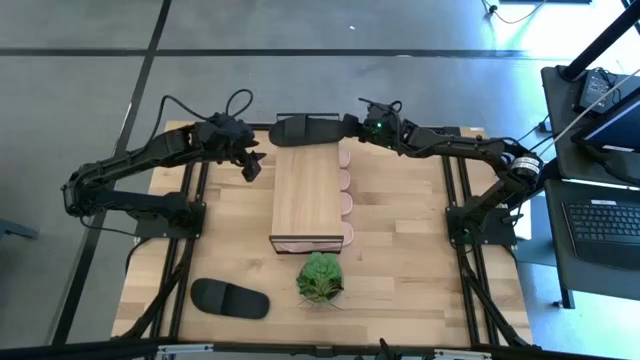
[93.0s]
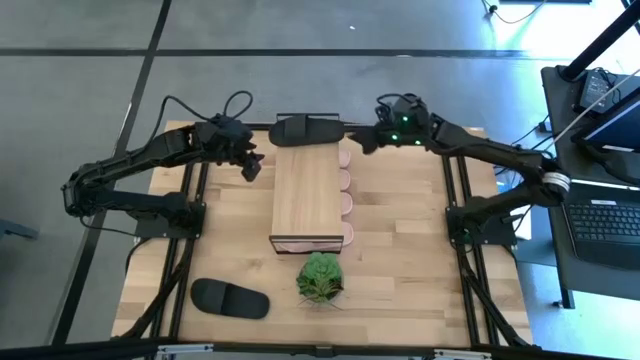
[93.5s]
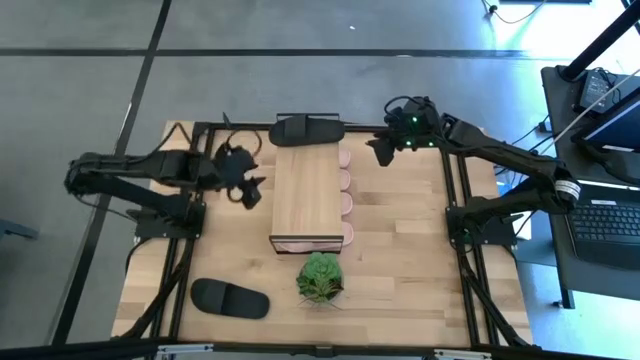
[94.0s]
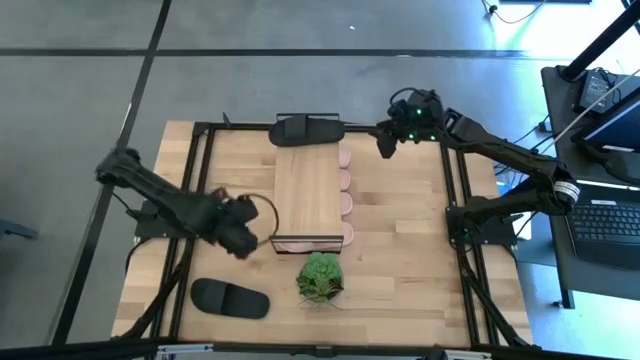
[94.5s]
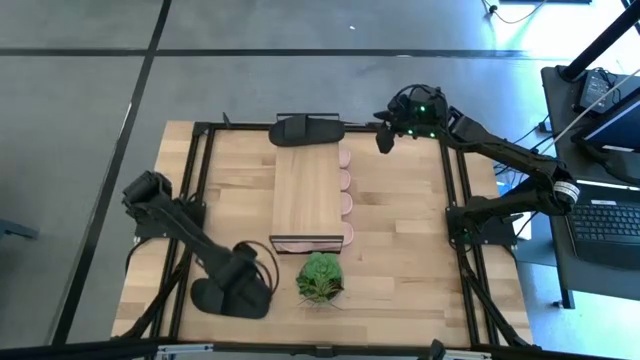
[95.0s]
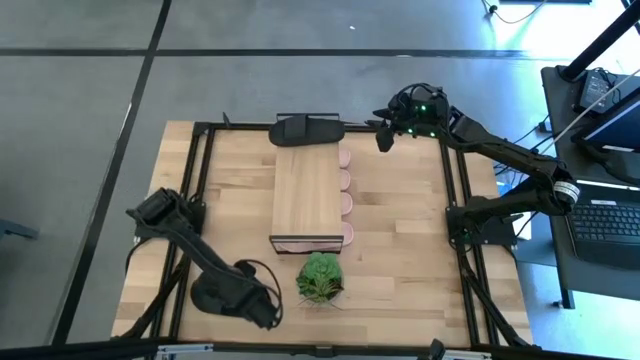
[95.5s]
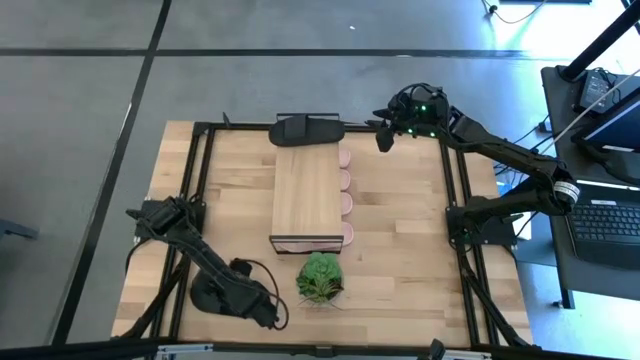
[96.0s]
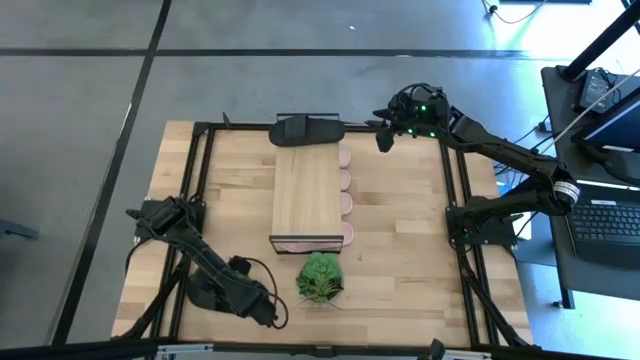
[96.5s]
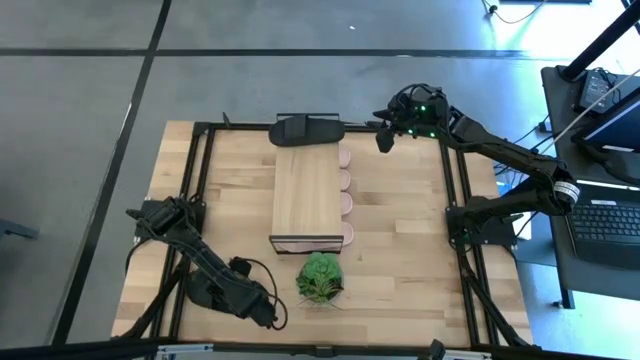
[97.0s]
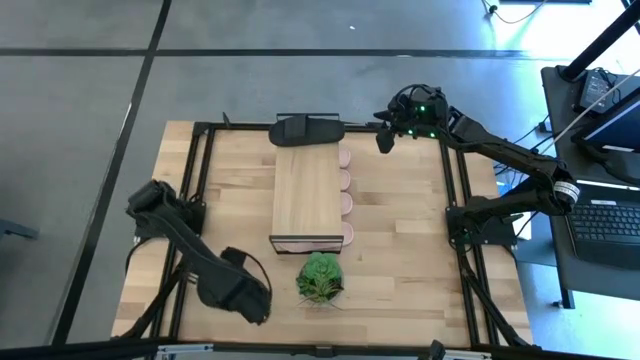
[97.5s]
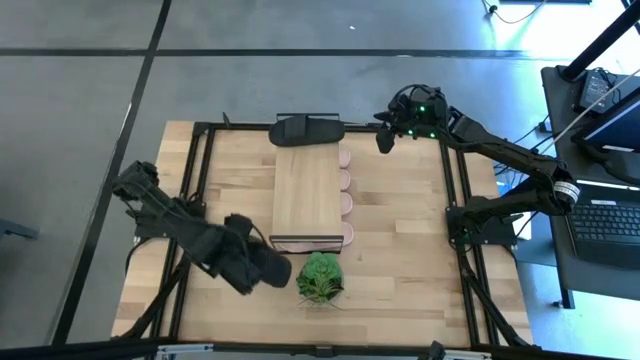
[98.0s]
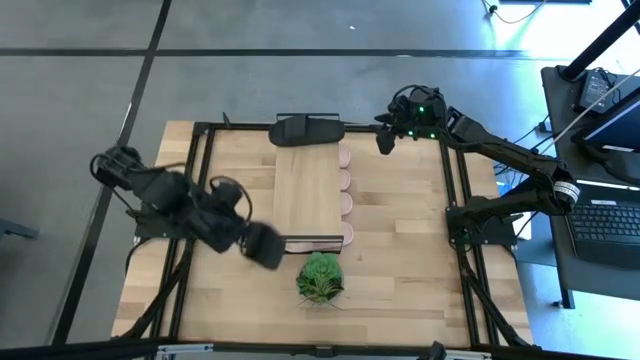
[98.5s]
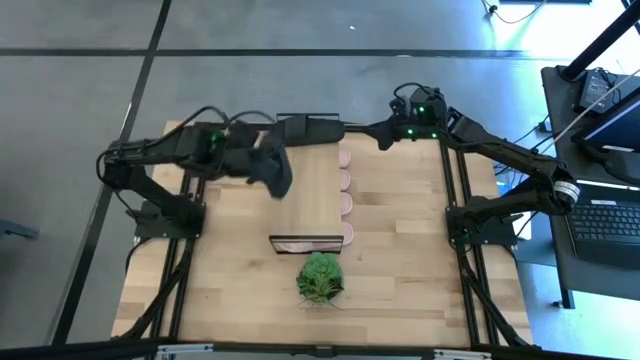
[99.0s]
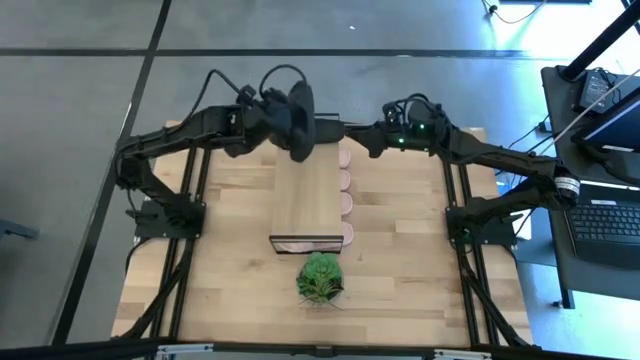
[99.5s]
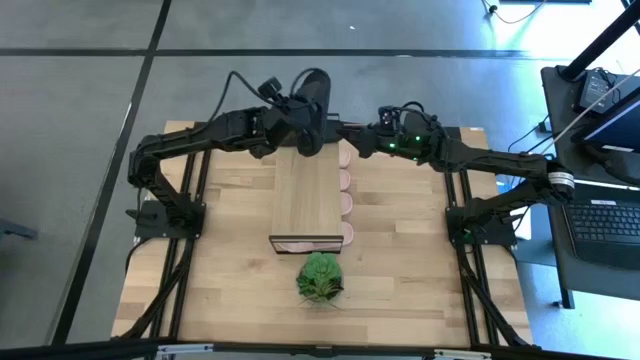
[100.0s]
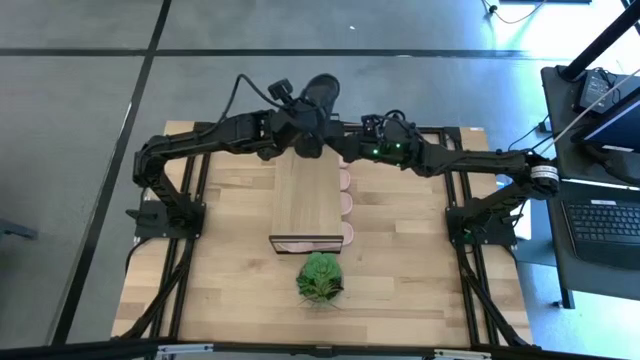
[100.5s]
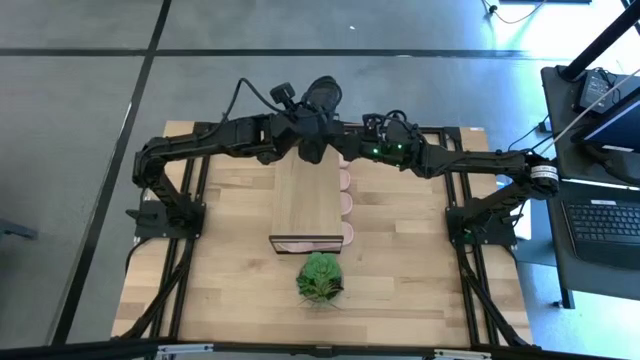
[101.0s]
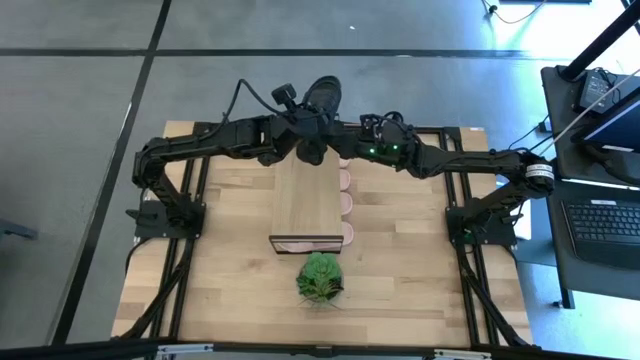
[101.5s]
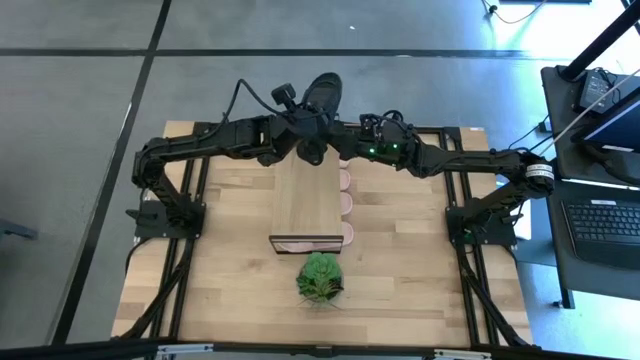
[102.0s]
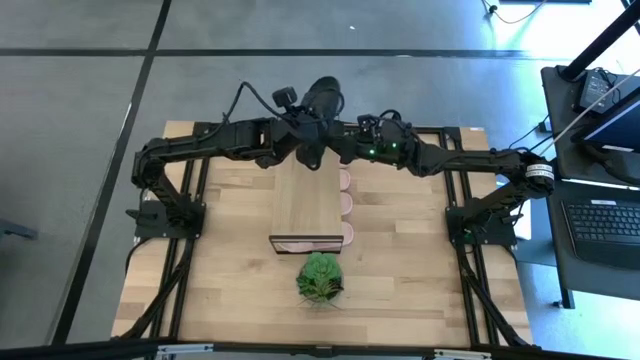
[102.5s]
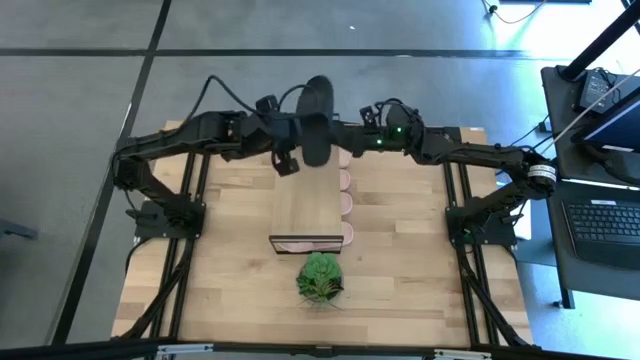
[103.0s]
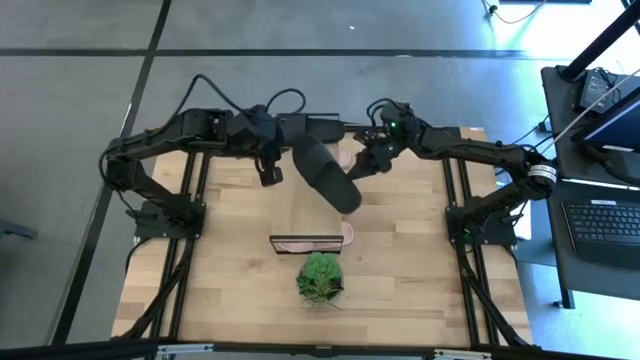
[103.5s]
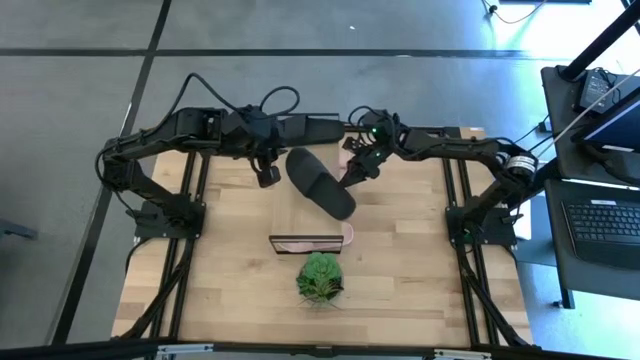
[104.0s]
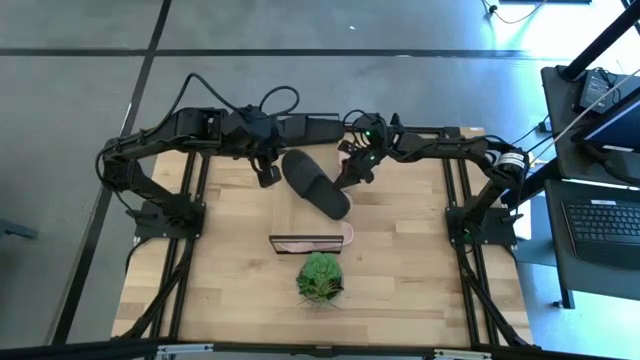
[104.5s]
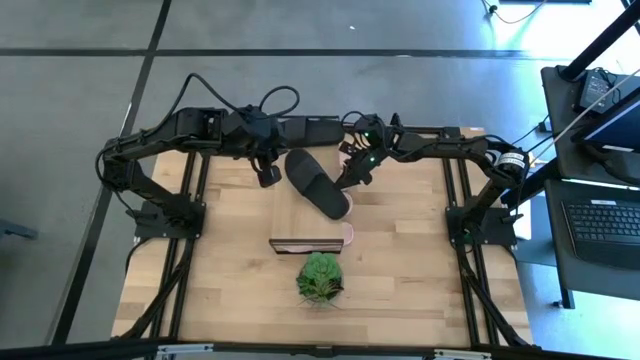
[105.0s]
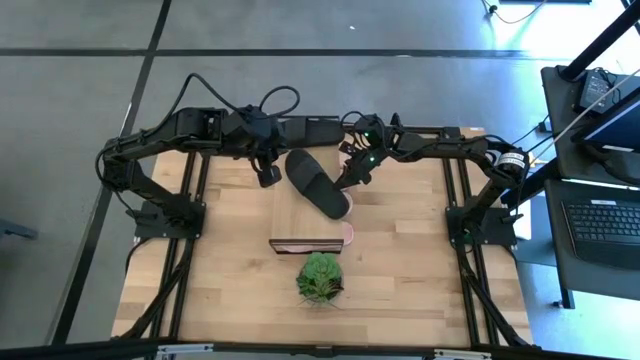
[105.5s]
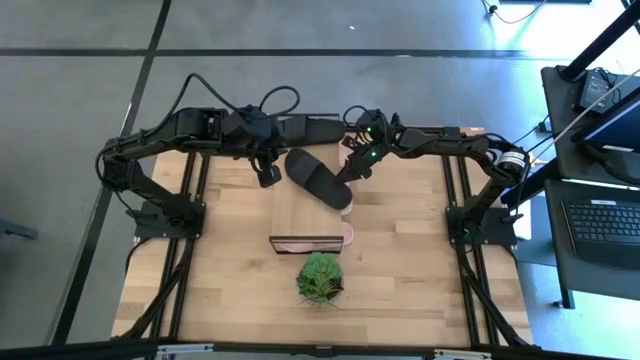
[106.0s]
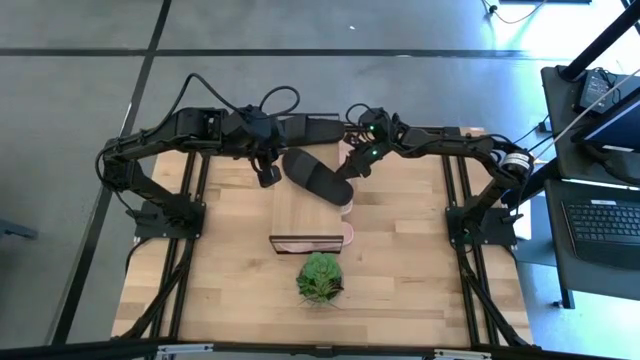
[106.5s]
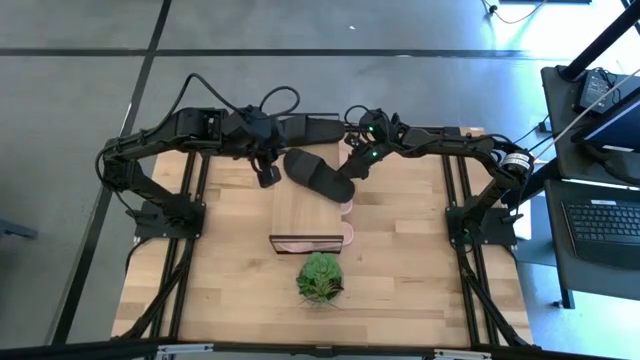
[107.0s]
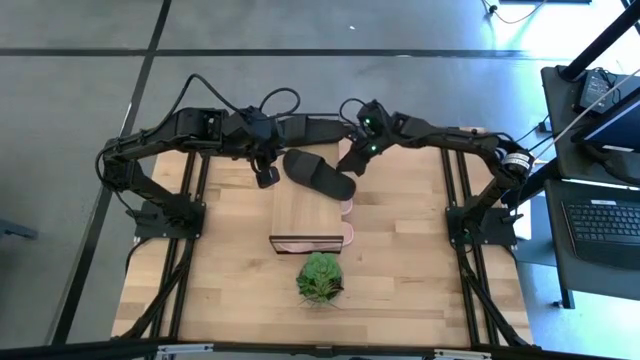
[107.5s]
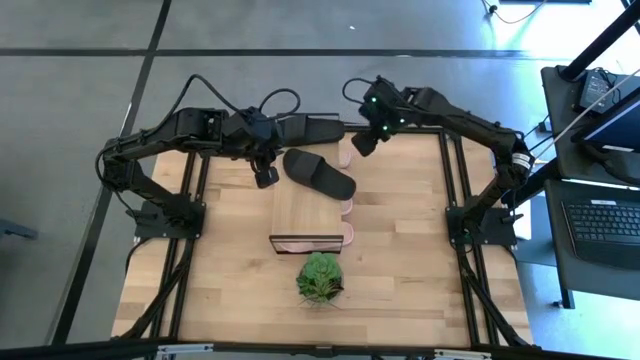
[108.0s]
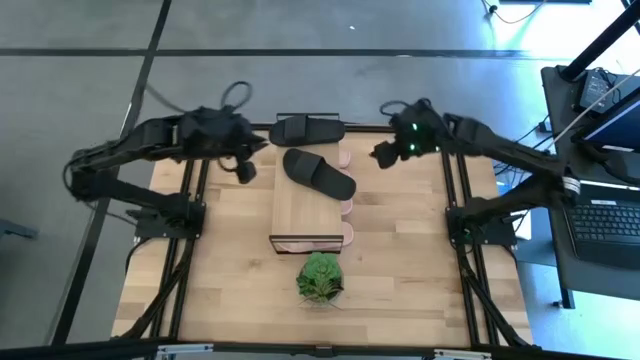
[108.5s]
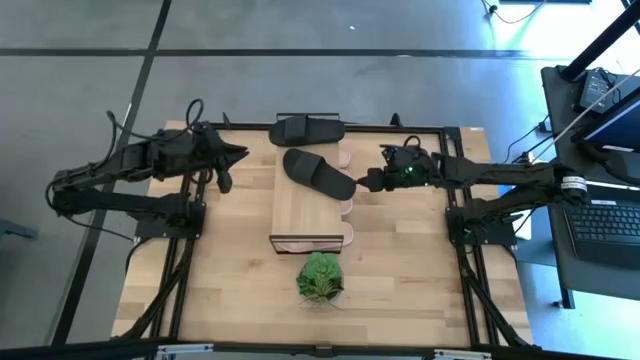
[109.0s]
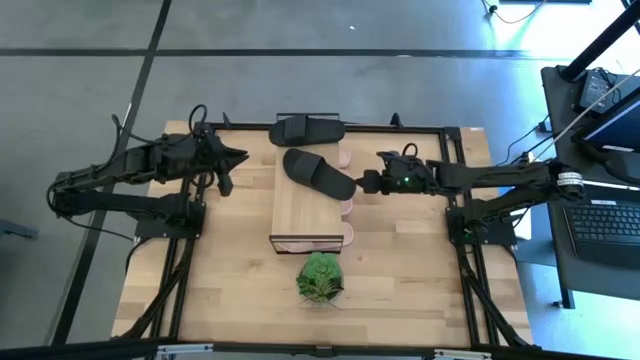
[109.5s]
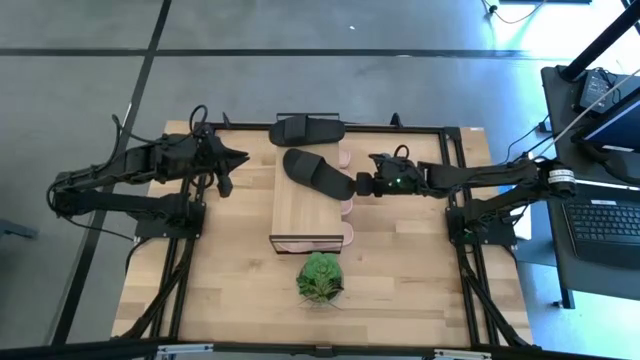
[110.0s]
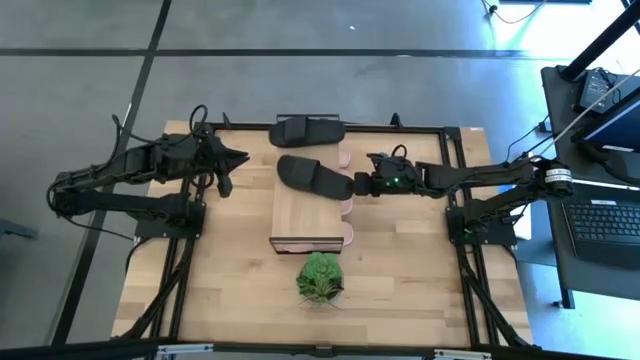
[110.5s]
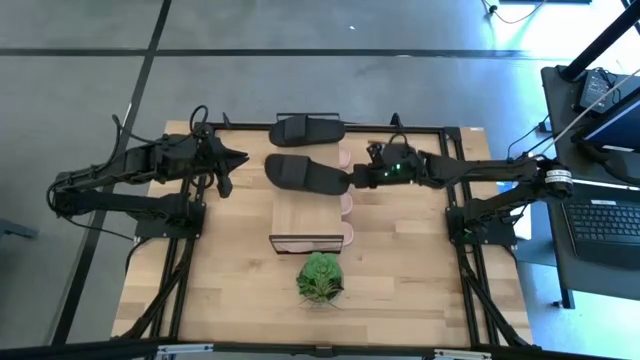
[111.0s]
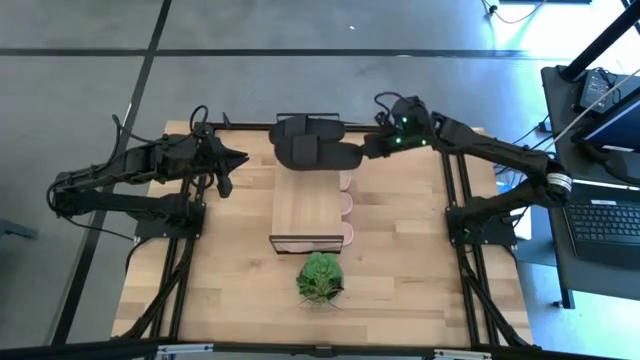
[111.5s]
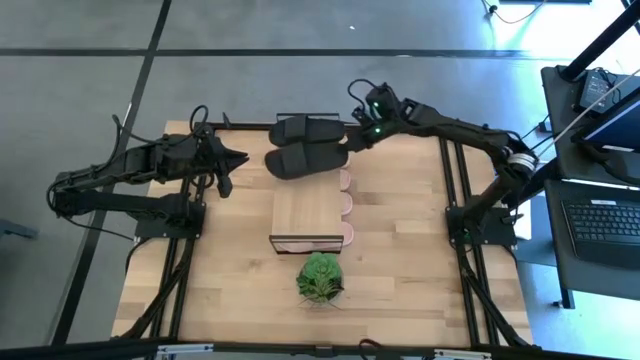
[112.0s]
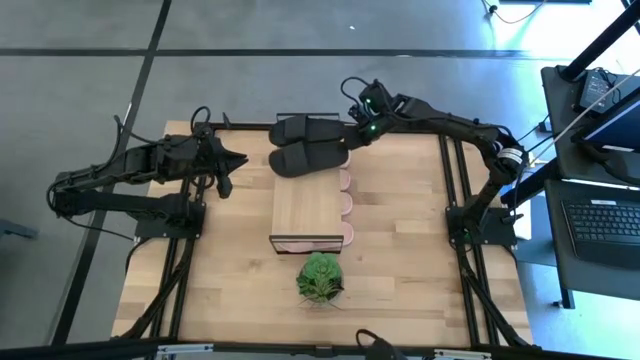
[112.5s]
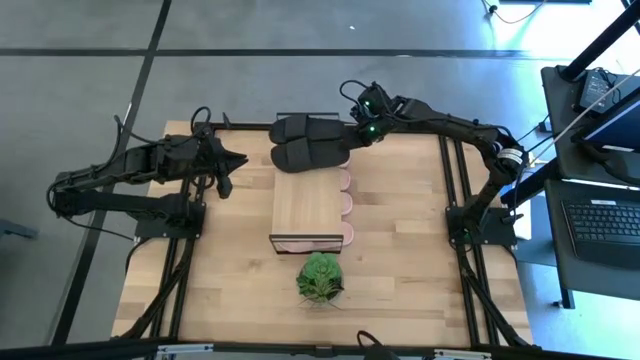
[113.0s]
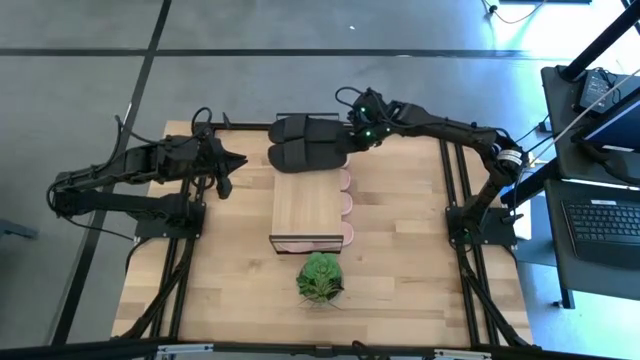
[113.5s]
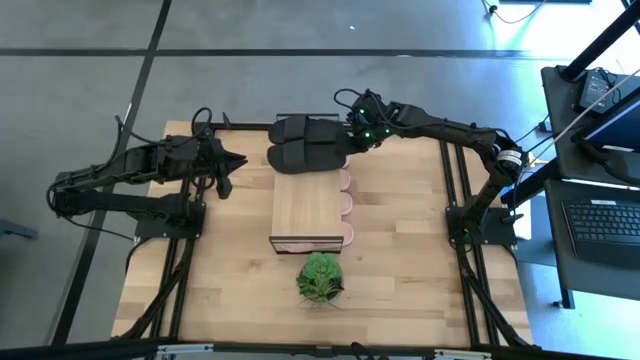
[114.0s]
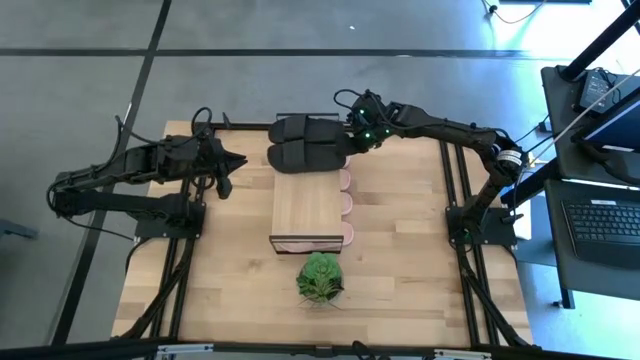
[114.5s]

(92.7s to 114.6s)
Task: Pick and place slides into the shelf
Put the black slipper on the shelf
